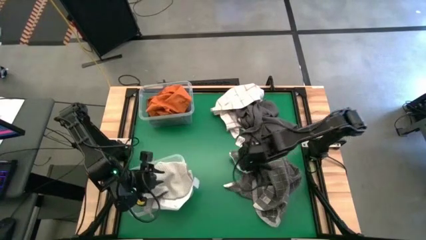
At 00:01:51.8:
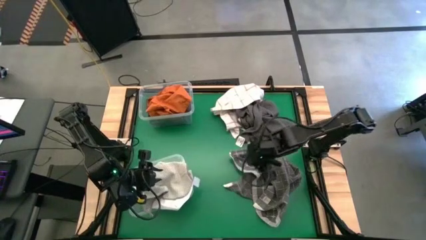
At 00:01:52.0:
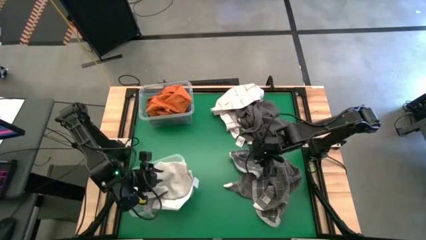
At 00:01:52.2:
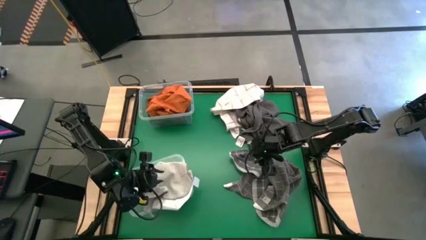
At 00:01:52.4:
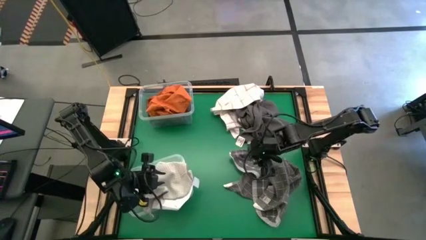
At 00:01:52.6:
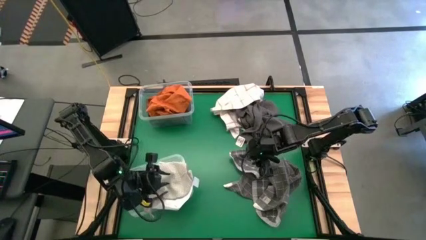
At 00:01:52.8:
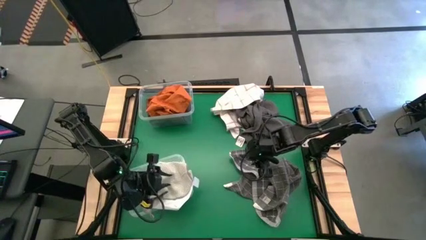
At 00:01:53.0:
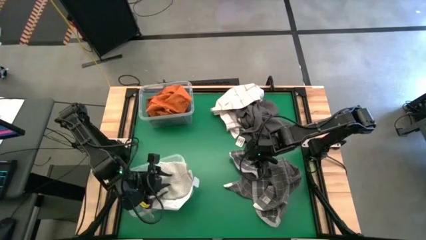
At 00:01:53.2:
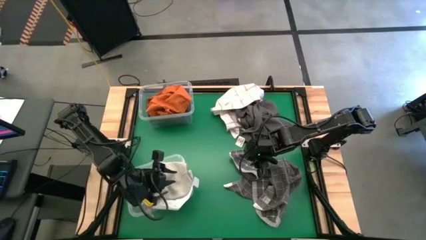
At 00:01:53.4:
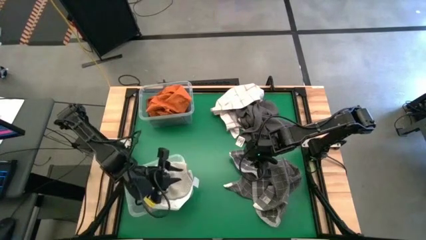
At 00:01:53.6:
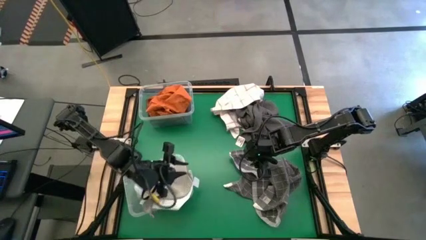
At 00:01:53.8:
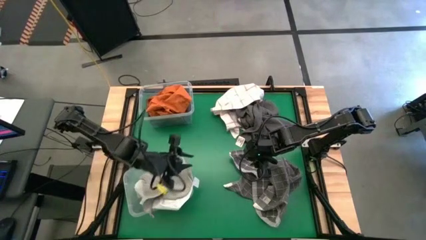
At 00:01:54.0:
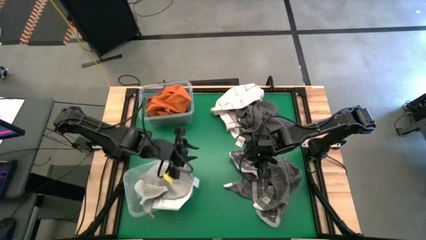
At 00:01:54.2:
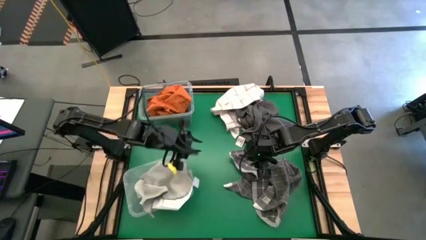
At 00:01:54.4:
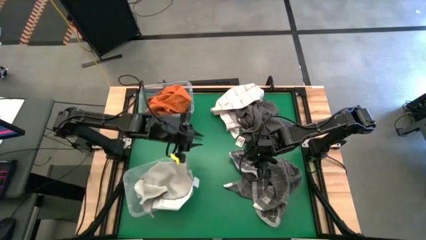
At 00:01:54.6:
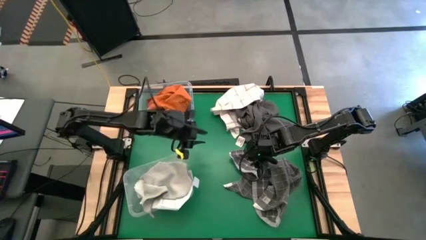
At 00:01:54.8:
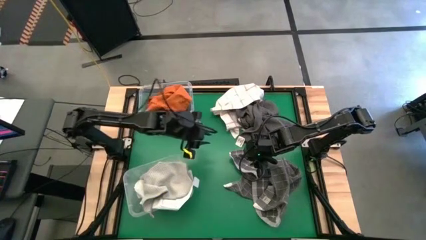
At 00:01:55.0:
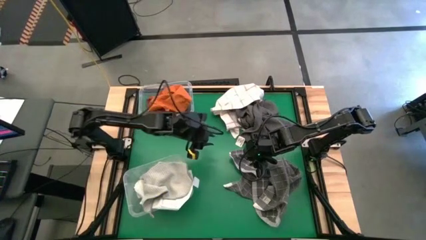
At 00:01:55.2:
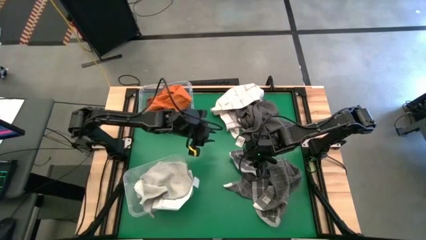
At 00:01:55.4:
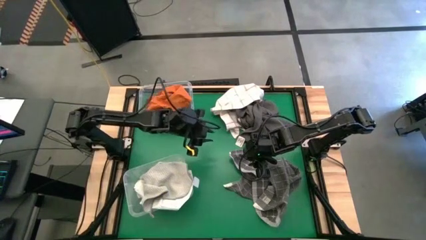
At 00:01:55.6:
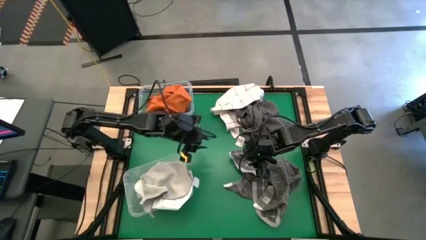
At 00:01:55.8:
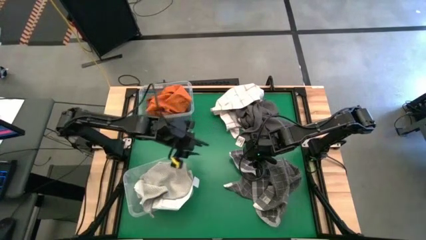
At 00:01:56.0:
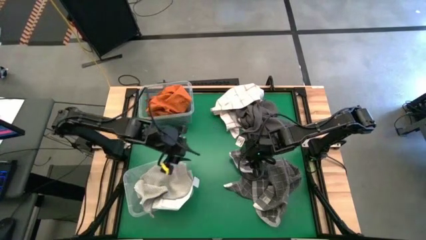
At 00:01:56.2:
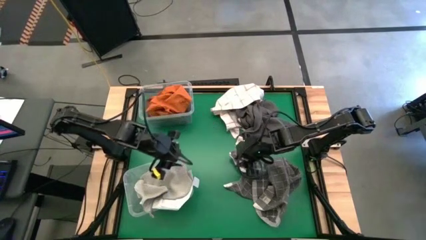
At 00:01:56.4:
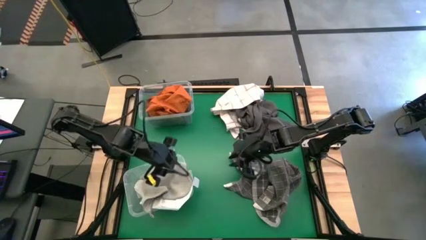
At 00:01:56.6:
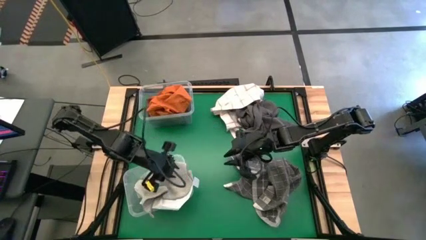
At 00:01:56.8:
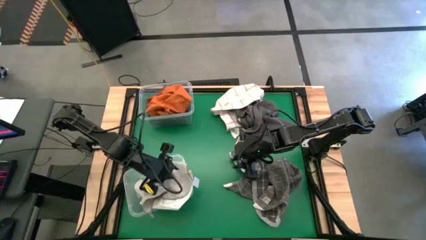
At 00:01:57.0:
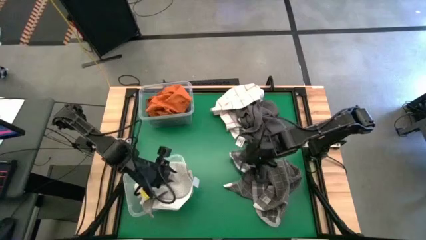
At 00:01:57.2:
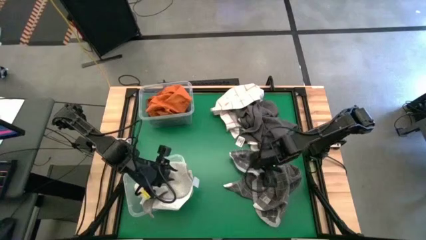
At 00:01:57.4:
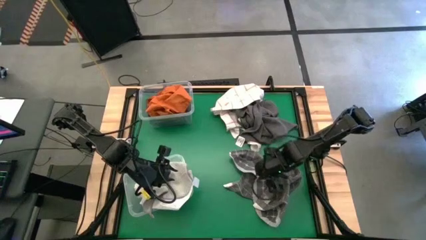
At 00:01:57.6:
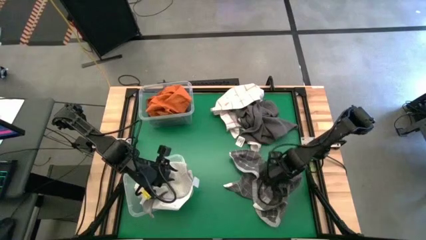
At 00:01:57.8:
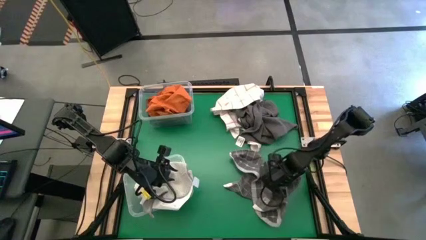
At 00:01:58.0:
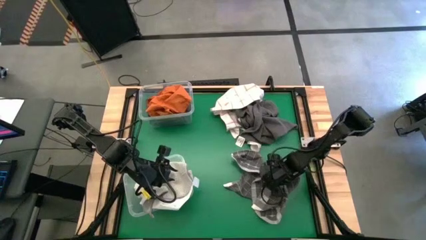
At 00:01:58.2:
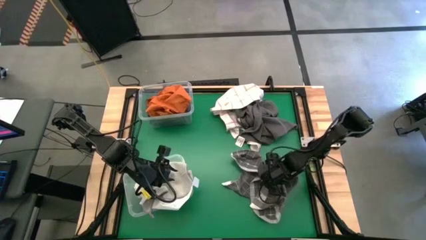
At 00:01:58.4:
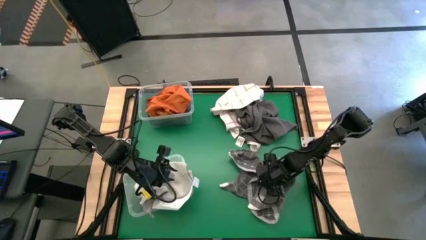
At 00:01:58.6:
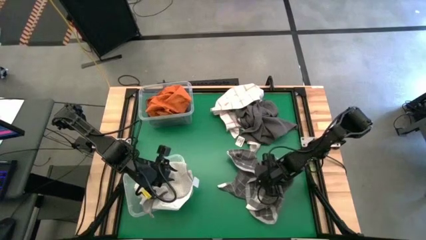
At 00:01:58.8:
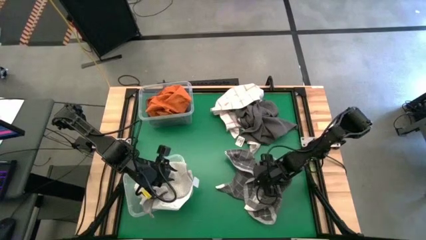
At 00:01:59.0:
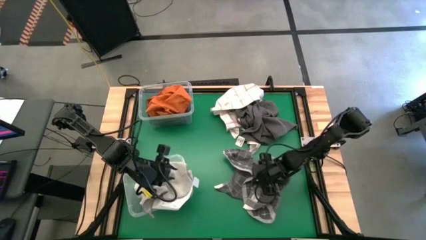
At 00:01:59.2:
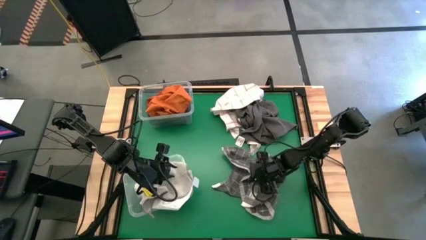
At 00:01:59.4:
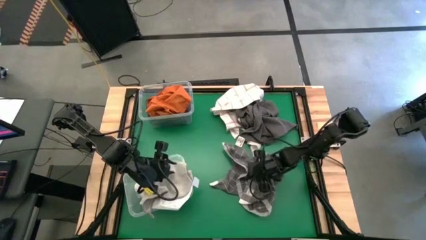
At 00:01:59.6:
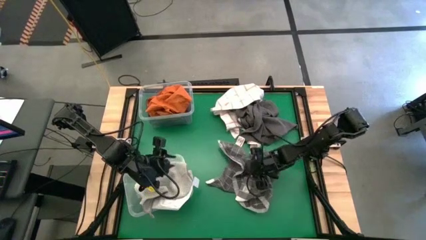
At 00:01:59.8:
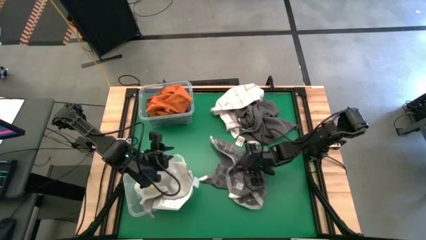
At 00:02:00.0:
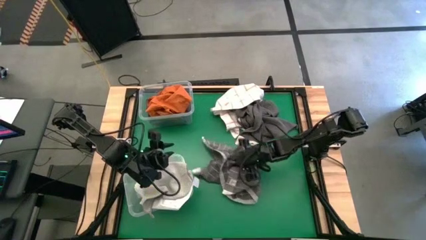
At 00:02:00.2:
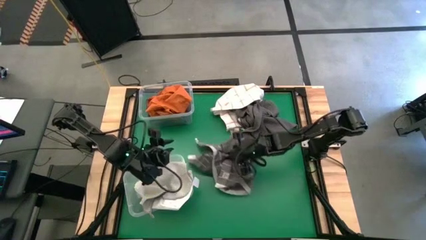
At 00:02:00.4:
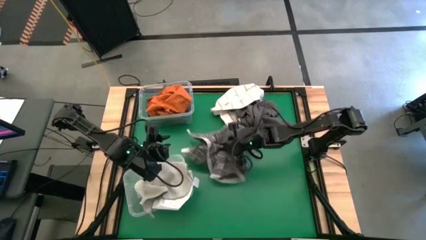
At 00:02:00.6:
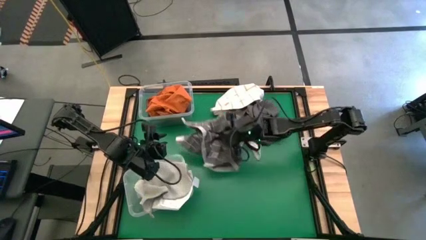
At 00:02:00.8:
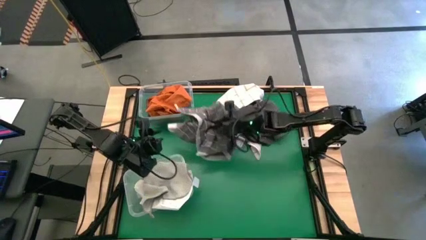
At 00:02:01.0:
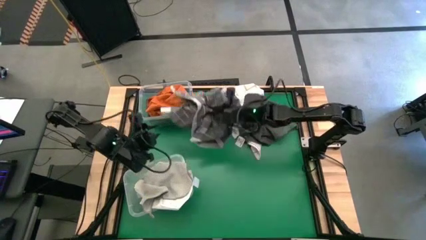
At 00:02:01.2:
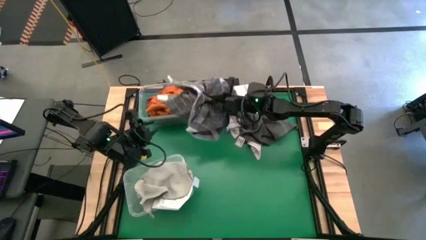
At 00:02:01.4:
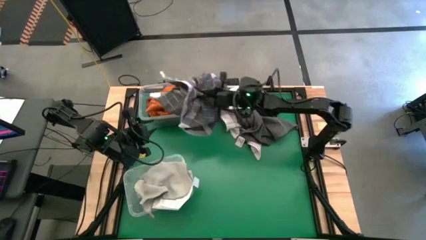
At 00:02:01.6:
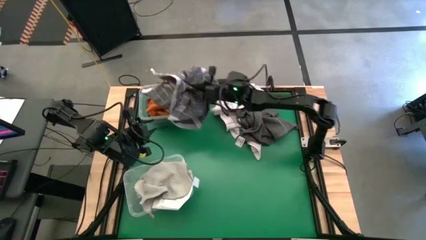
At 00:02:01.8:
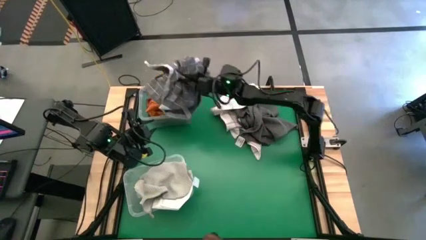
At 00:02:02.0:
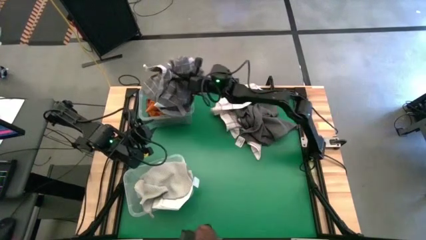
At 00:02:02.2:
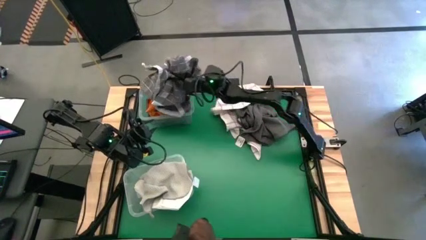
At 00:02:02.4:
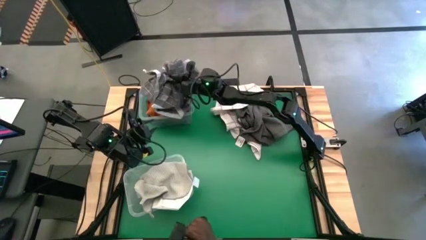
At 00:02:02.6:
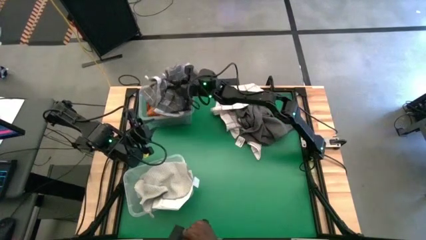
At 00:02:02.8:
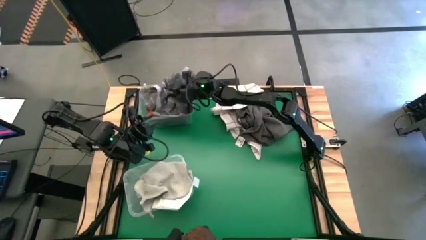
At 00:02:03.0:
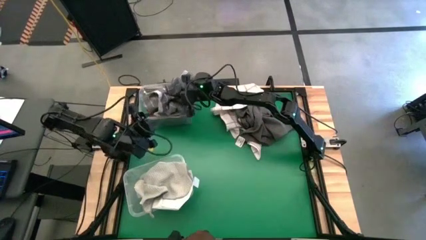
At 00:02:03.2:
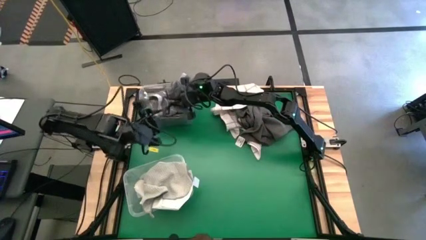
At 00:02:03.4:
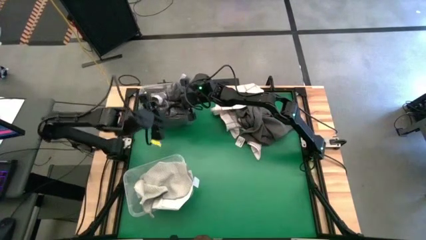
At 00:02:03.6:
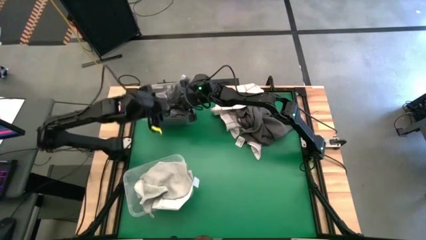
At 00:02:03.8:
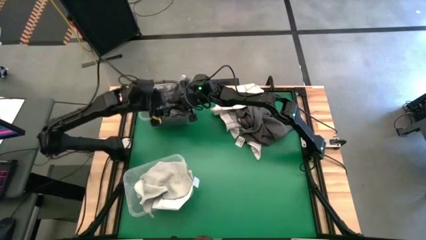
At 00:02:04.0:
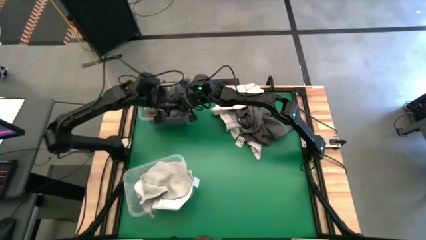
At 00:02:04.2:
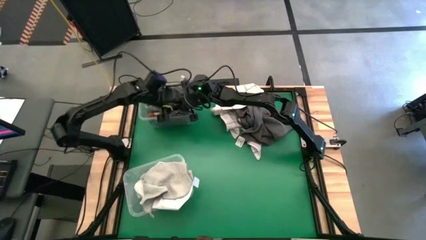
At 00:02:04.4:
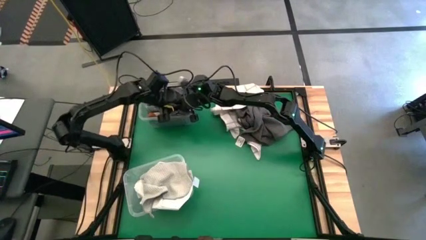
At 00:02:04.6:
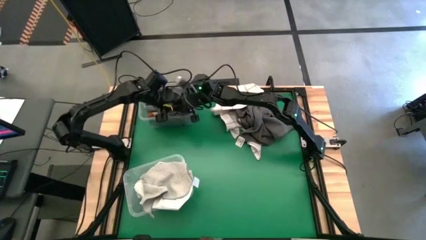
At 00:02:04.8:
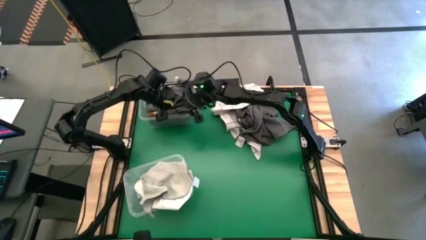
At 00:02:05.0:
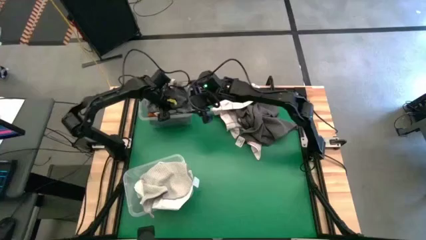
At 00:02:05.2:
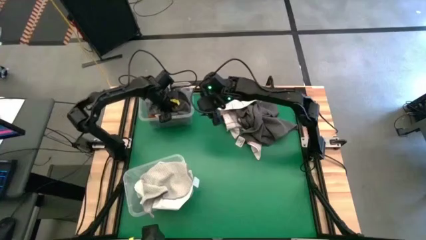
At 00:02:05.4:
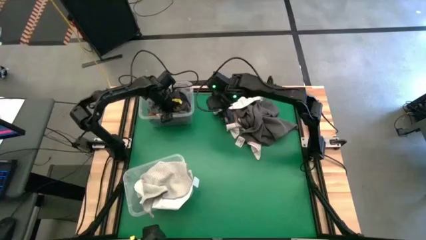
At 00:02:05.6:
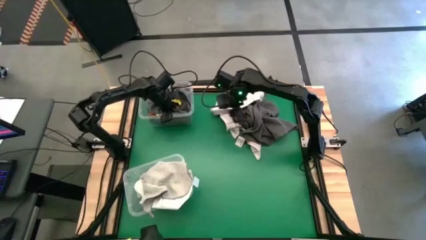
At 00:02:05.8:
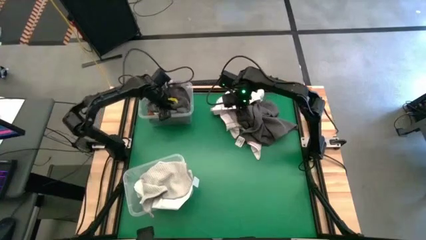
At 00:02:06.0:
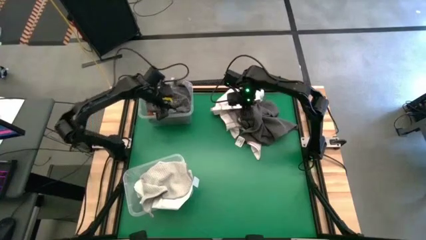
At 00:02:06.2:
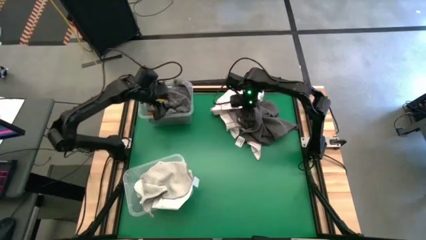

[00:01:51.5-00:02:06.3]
Task: Sort towels by color in basket
Put the black patterned towel into the top transparent bin
